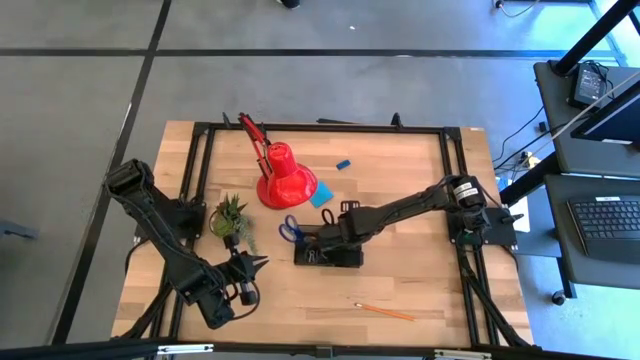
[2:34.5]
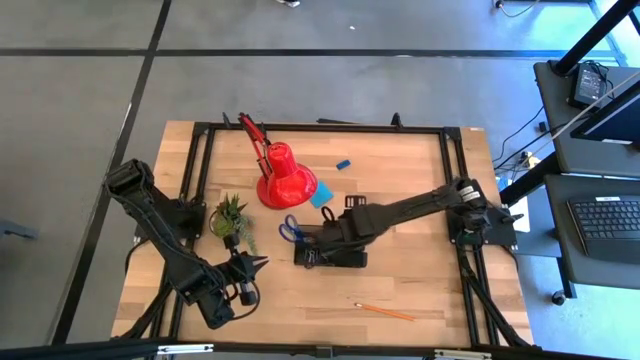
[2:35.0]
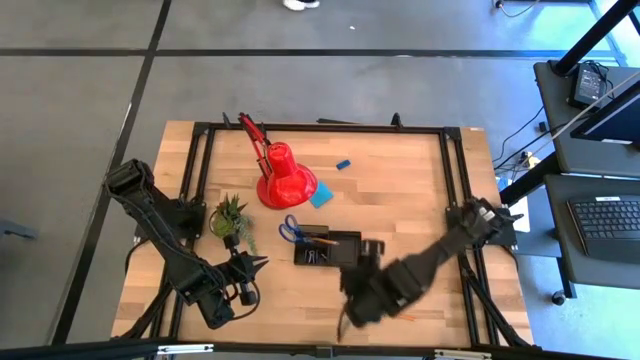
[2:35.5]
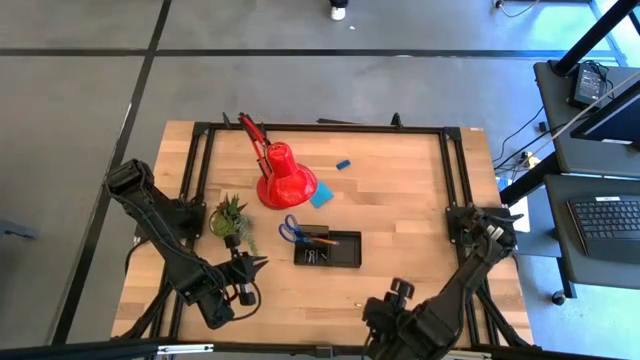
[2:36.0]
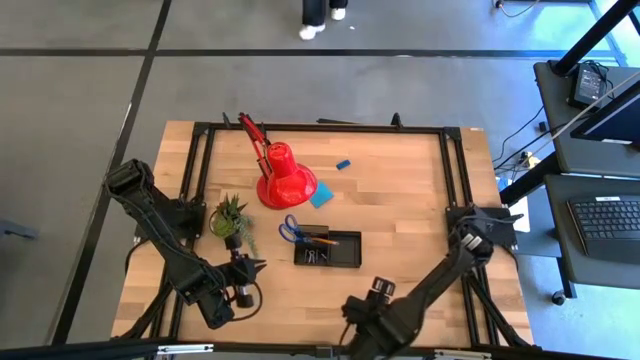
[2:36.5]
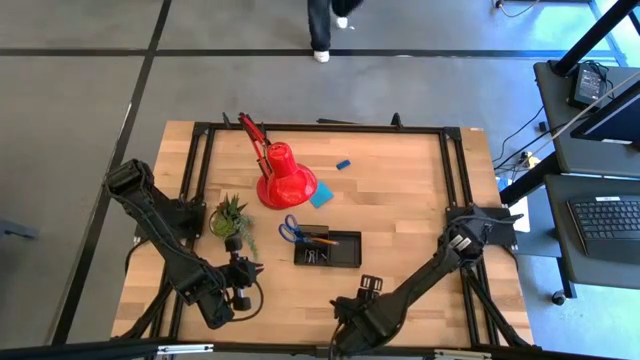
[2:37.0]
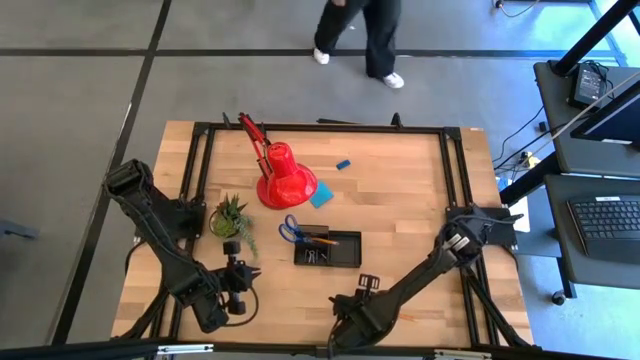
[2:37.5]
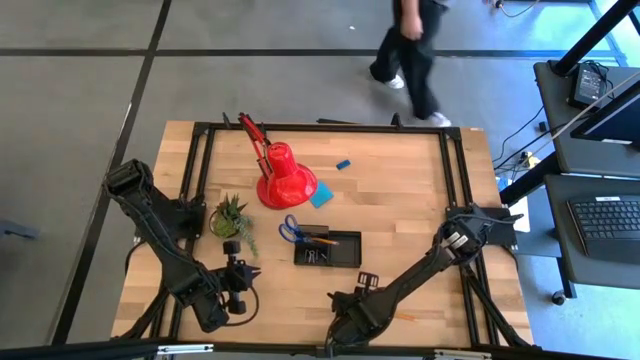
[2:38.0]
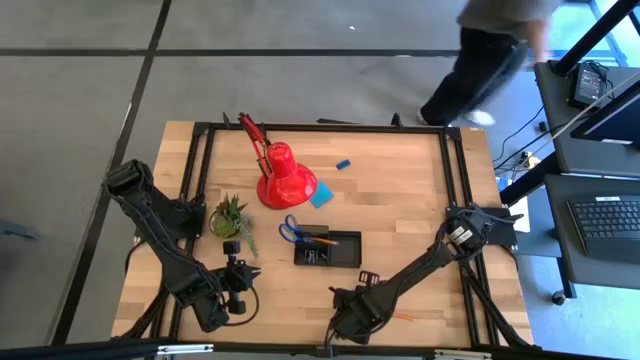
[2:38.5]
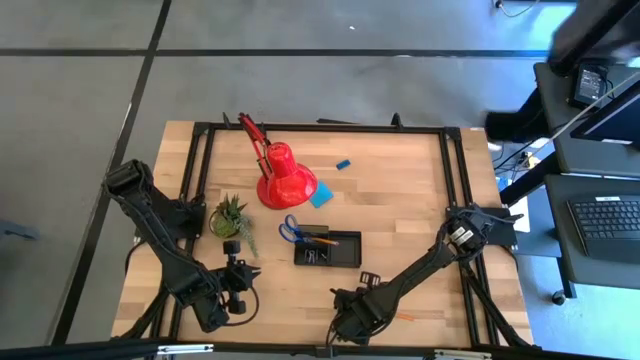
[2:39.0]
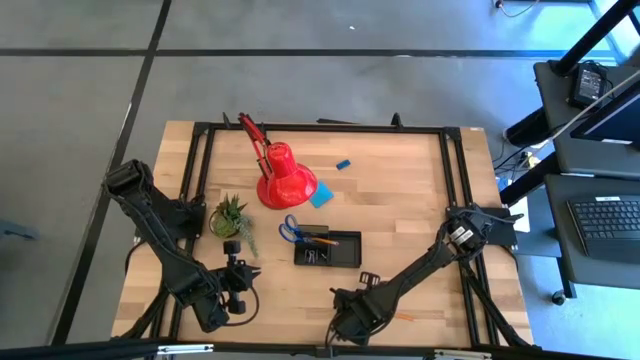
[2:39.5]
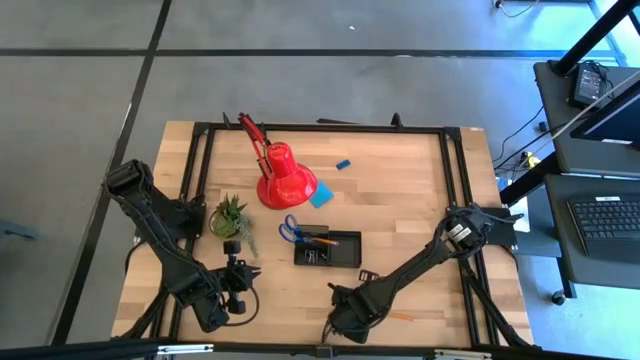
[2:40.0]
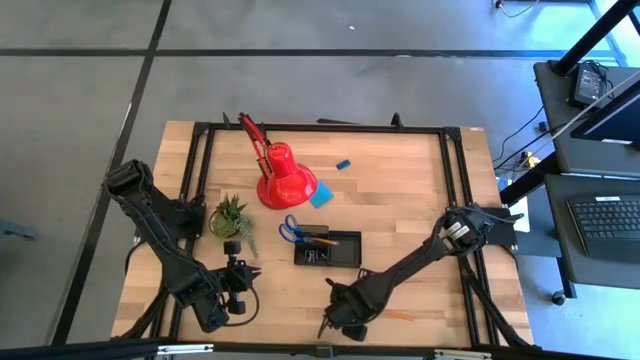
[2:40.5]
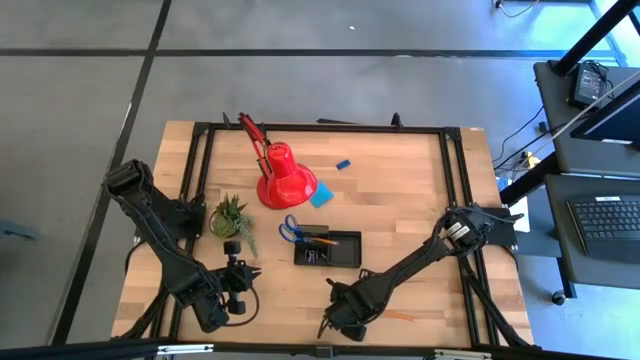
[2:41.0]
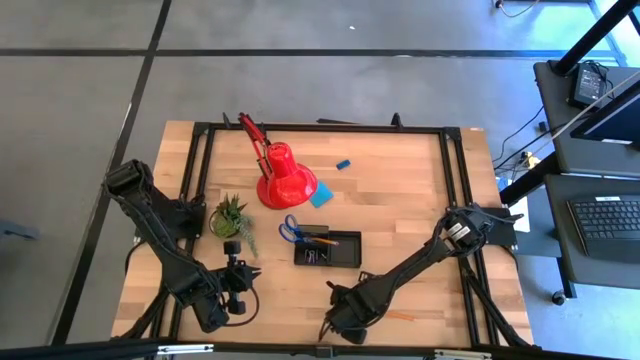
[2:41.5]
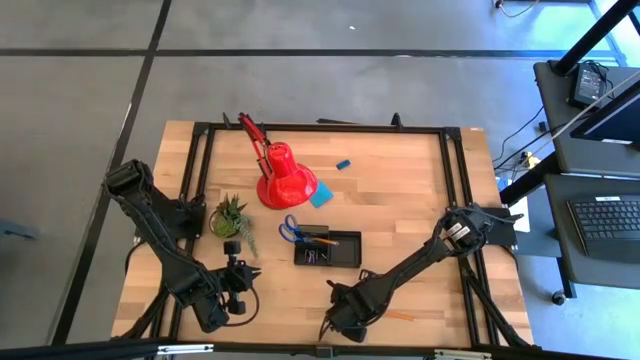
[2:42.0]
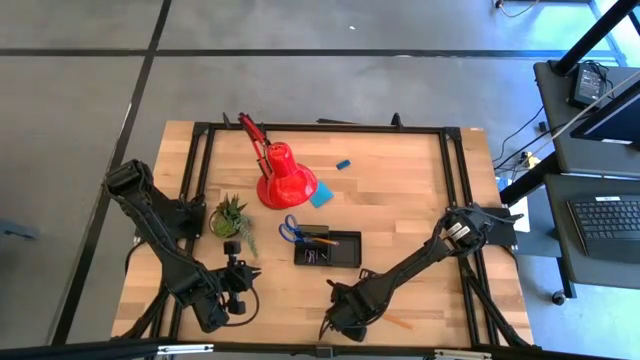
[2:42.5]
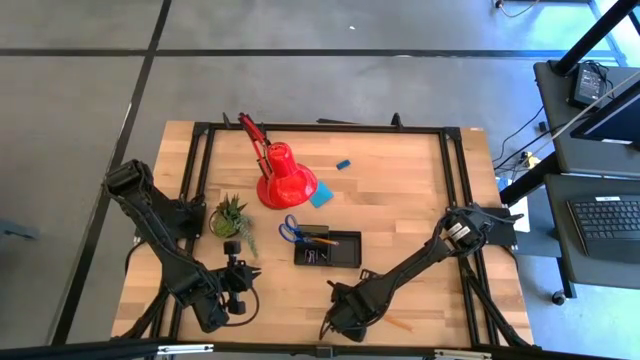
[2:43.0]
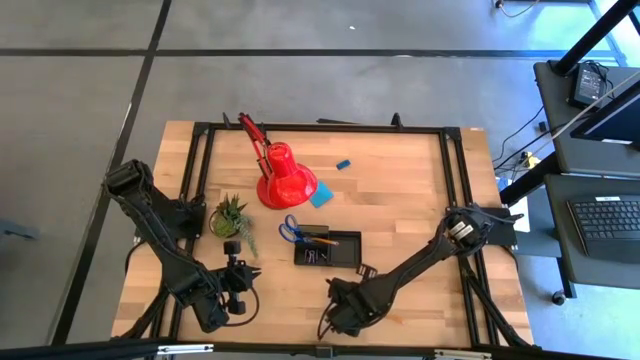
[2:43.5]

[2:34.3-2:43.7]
Task: Pick and place office supplies into organizer
Put the orange pencil into the desk organizer

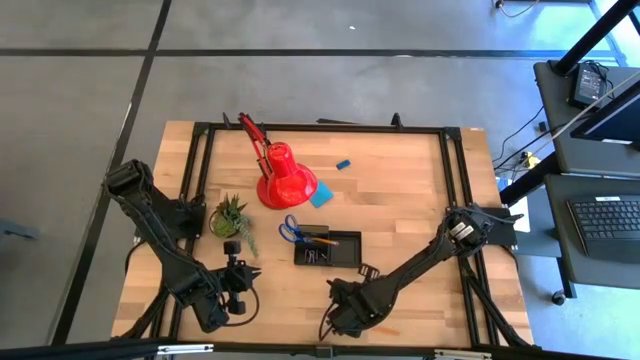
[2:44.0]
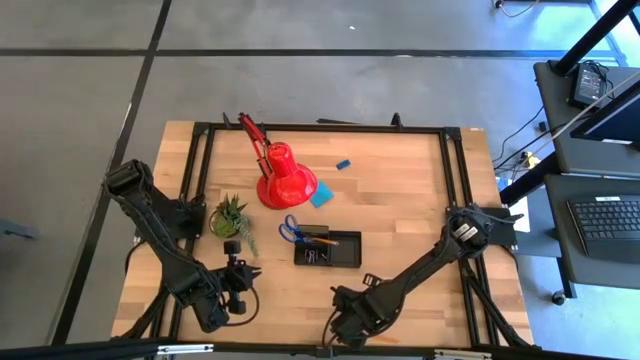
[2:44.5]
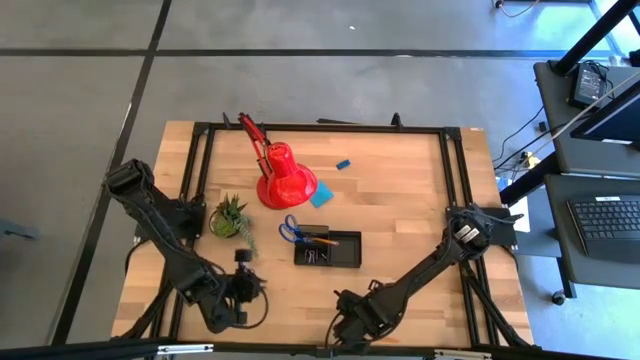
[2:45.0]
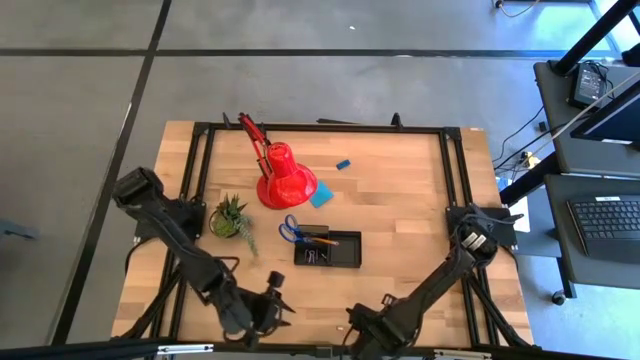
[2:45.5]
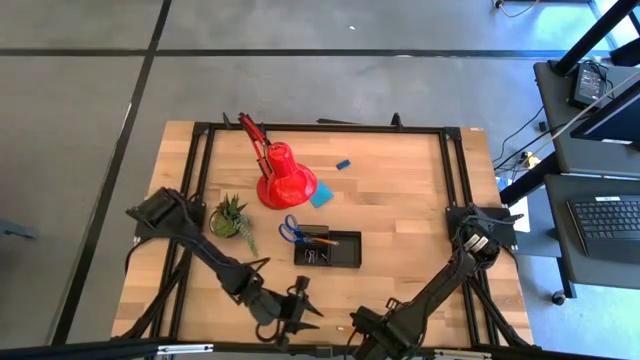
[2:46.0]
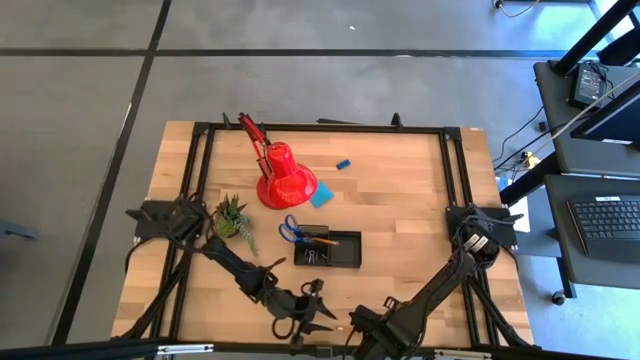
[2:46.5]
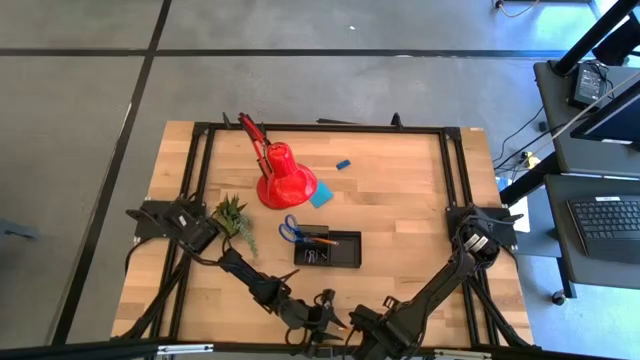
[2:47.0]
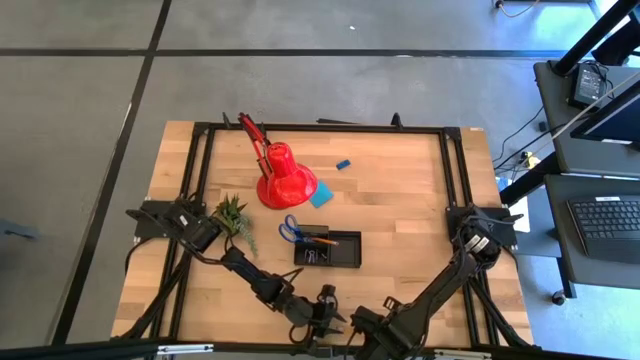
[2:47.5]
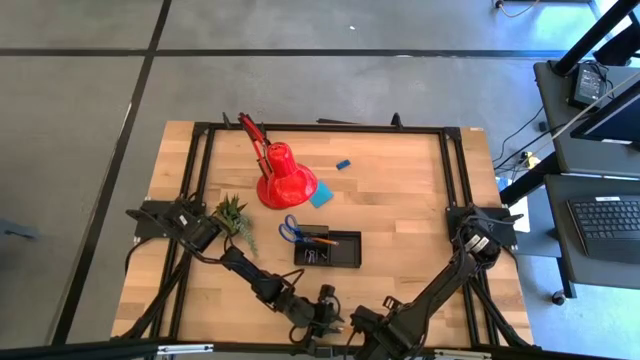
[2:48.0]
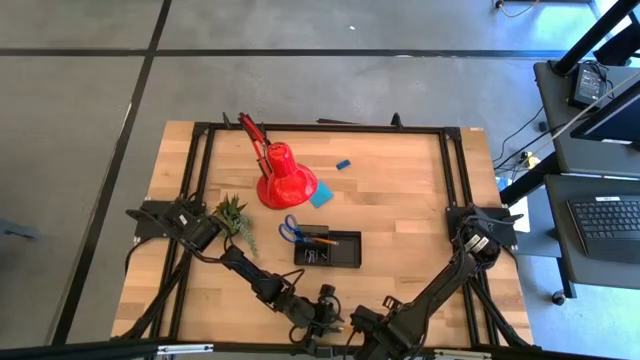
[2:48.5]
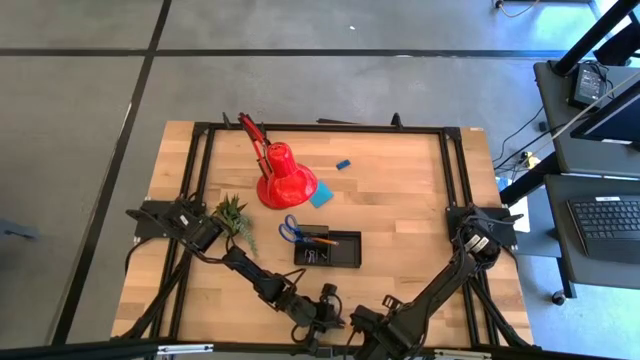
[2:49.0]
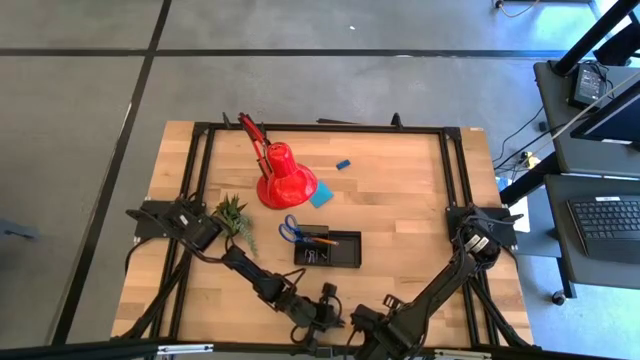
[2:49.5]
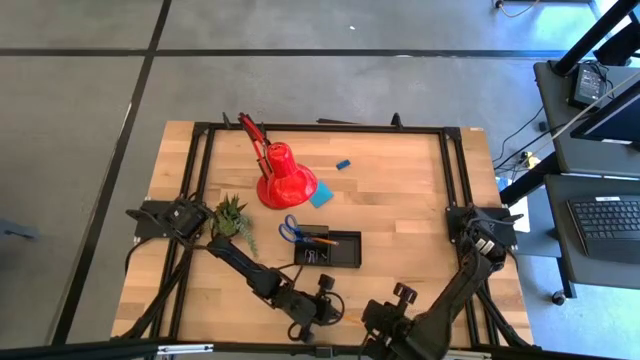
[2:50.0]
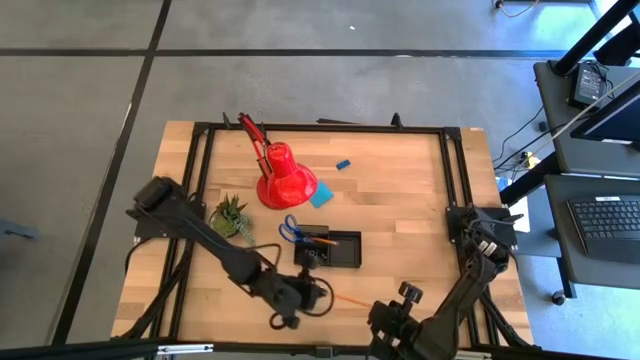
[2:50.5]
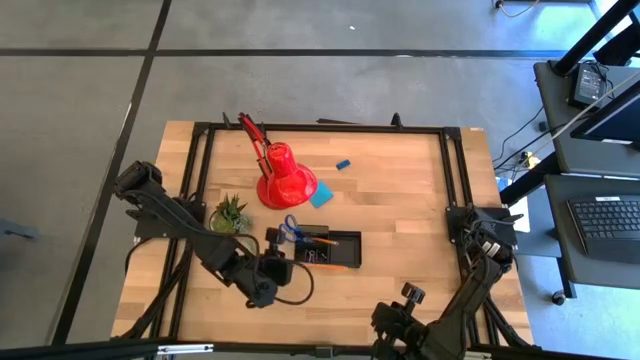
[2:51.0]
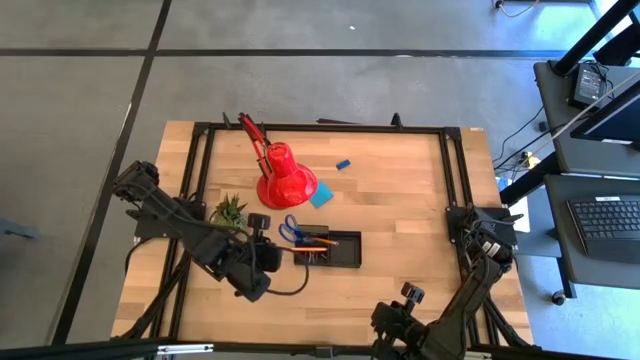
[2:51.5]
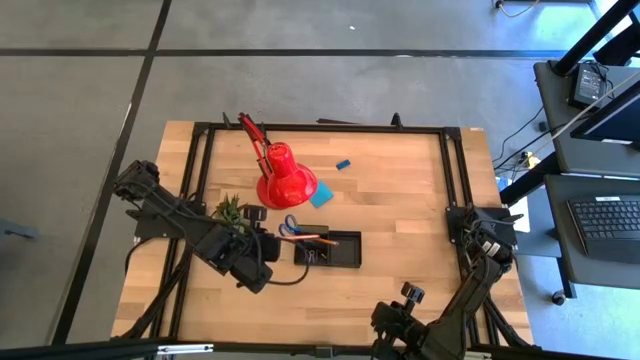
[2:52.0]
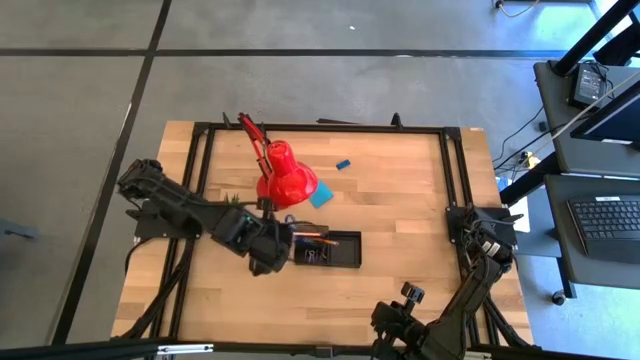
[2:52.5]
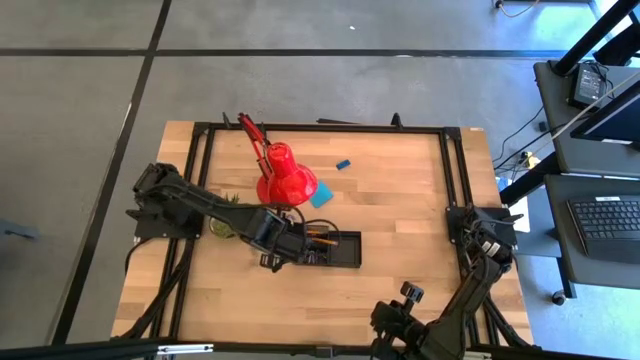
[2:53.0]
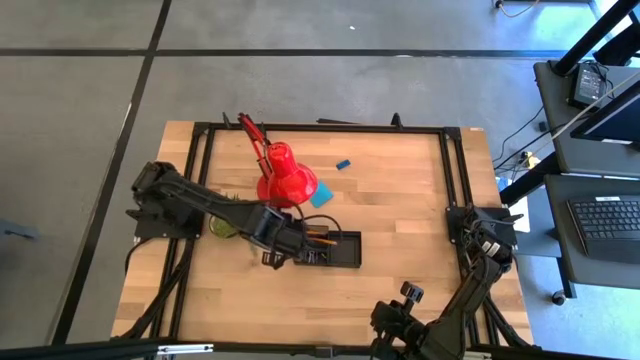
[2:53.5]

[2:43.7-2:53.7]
Put the orange pencil into the desk organizer

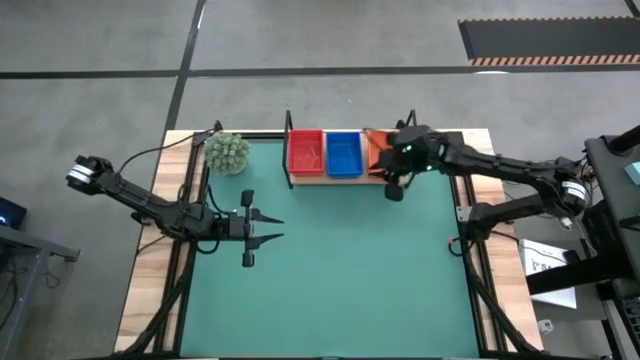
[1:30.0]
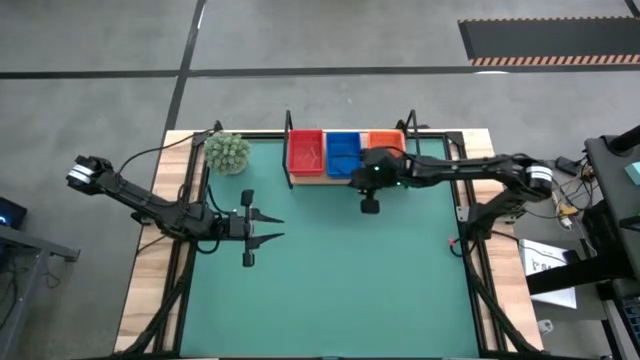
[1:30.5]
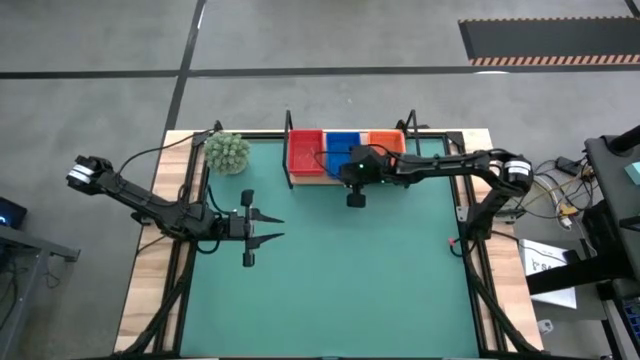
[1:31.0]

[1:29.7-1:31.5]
Task: Stack baskets on shelf by color
Adjust the blue bins on the shelf
